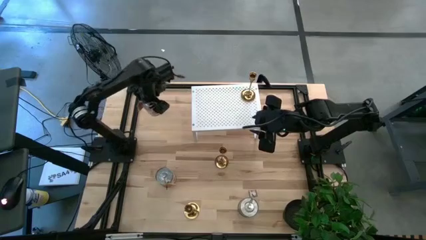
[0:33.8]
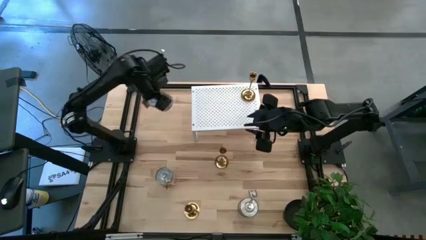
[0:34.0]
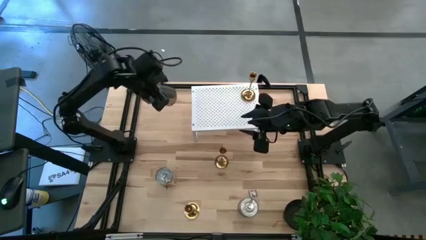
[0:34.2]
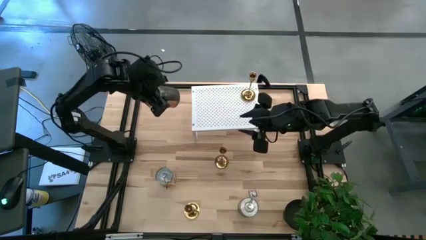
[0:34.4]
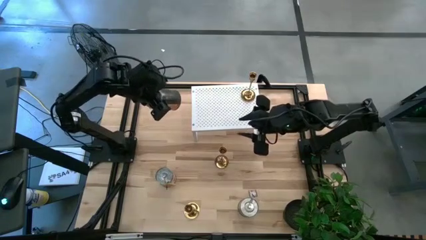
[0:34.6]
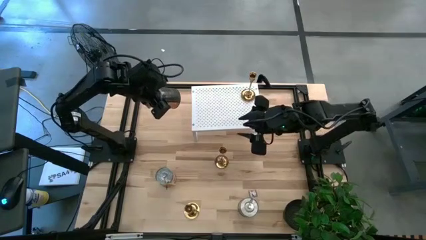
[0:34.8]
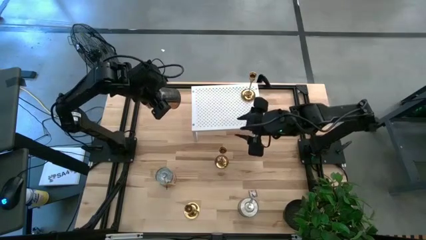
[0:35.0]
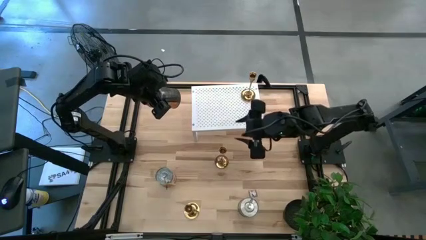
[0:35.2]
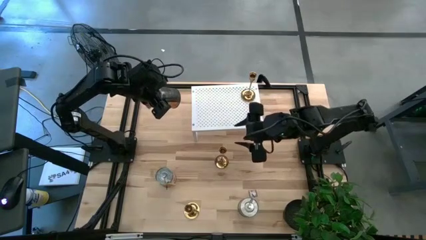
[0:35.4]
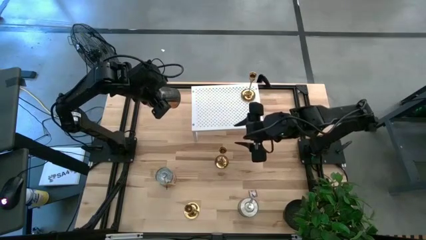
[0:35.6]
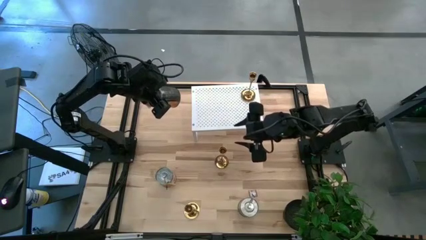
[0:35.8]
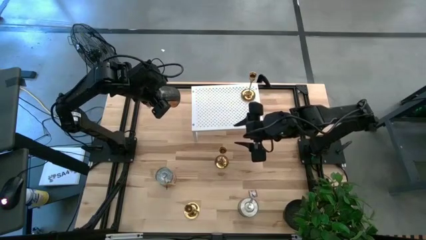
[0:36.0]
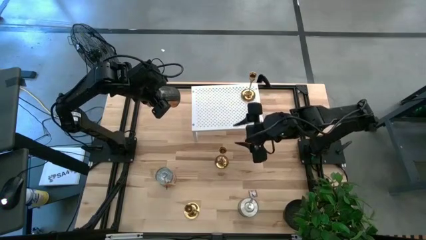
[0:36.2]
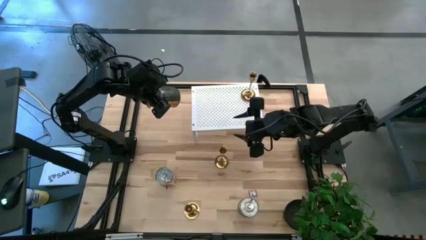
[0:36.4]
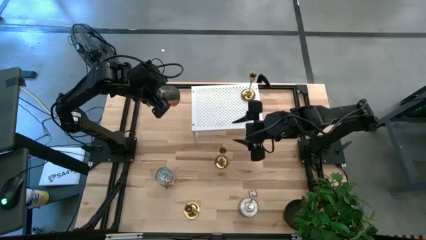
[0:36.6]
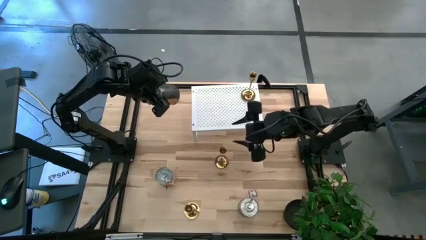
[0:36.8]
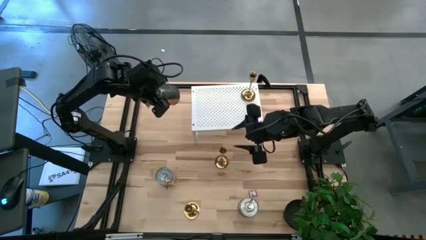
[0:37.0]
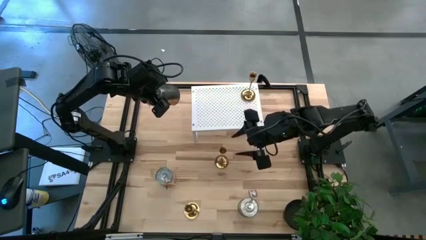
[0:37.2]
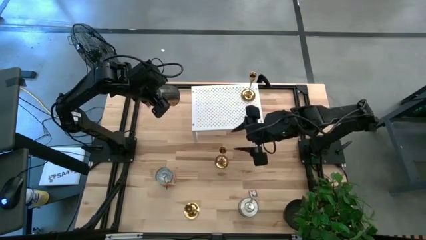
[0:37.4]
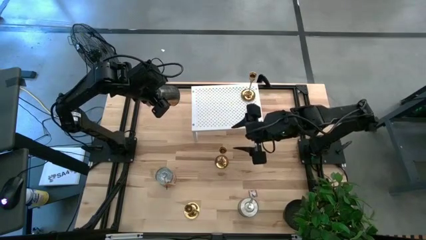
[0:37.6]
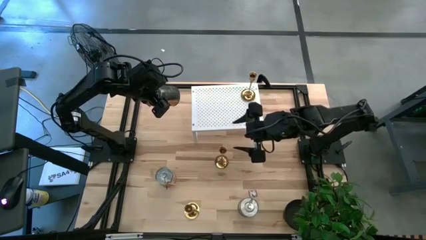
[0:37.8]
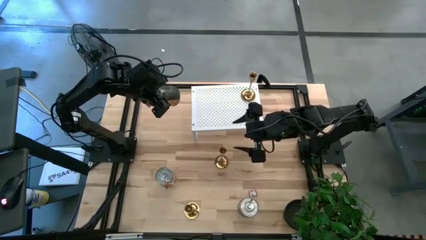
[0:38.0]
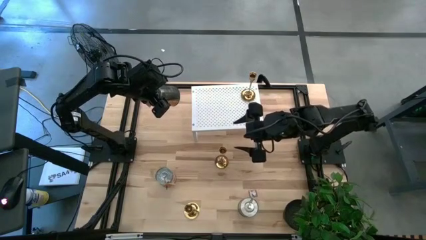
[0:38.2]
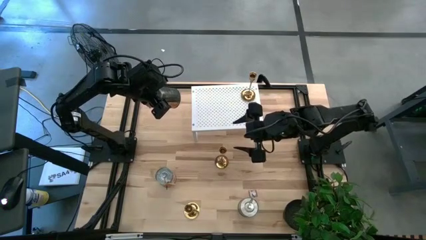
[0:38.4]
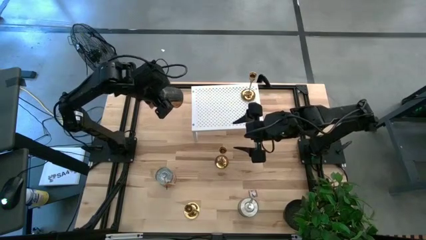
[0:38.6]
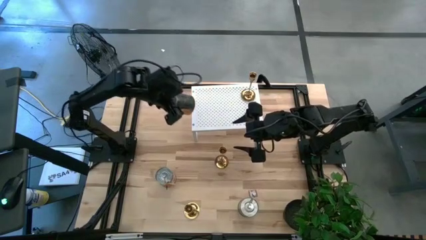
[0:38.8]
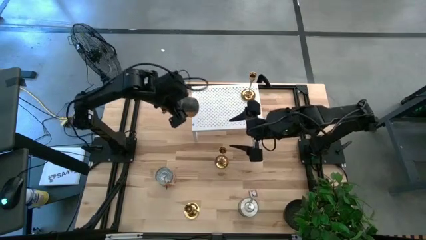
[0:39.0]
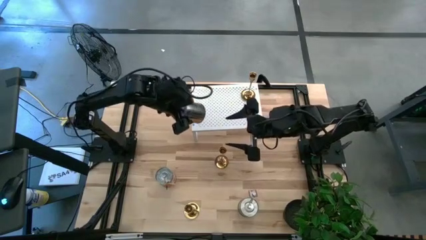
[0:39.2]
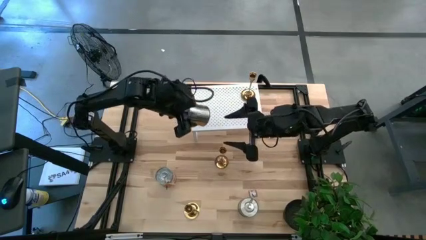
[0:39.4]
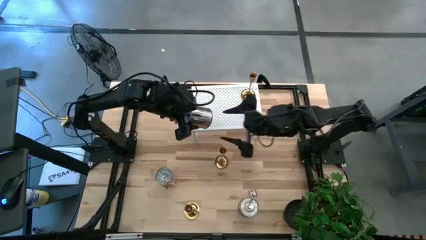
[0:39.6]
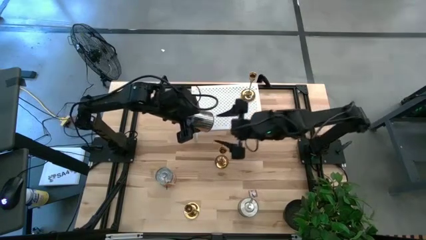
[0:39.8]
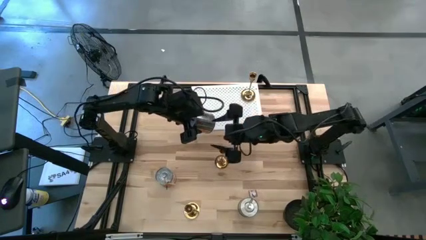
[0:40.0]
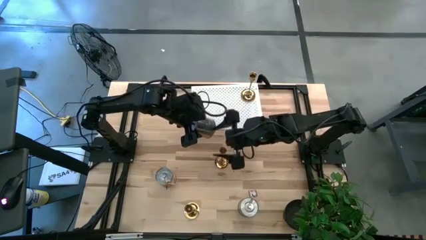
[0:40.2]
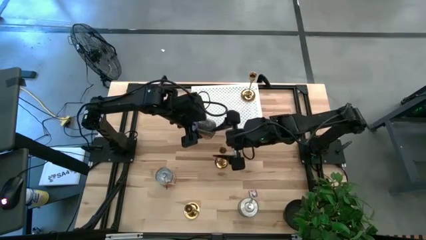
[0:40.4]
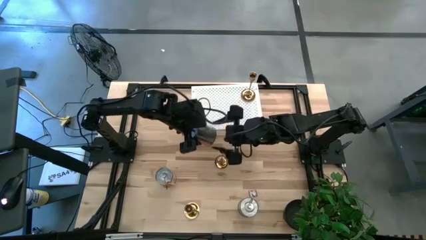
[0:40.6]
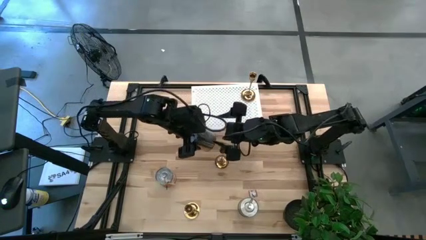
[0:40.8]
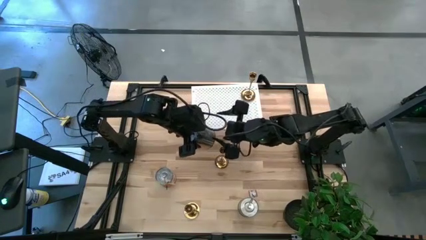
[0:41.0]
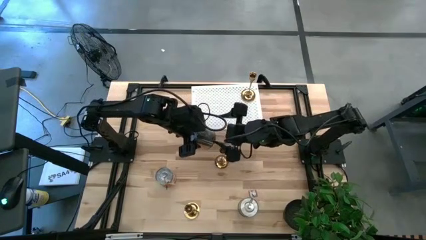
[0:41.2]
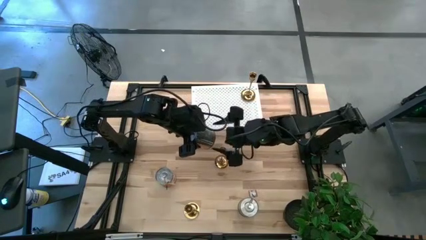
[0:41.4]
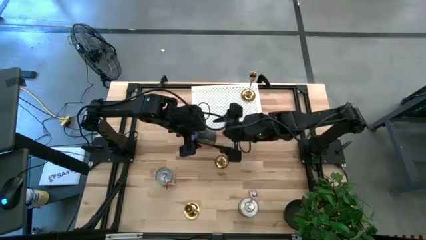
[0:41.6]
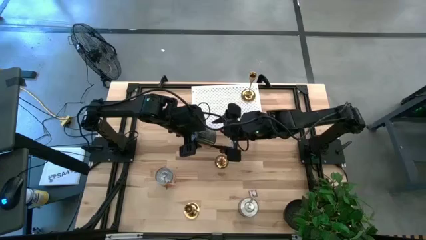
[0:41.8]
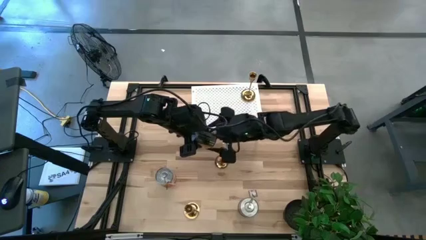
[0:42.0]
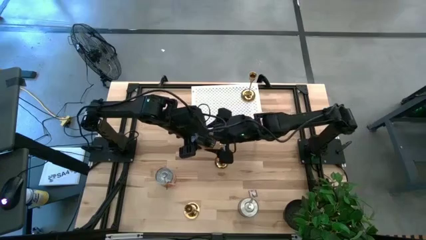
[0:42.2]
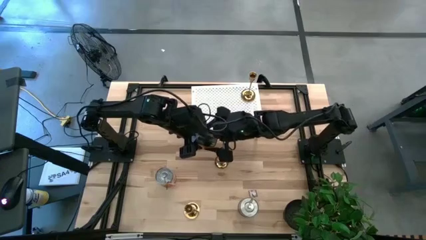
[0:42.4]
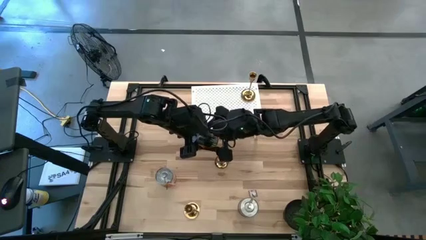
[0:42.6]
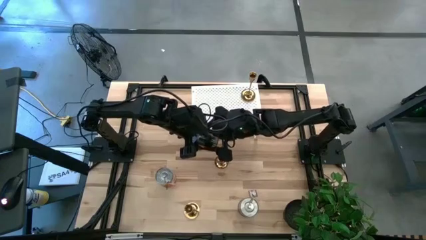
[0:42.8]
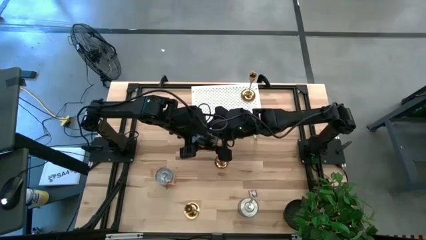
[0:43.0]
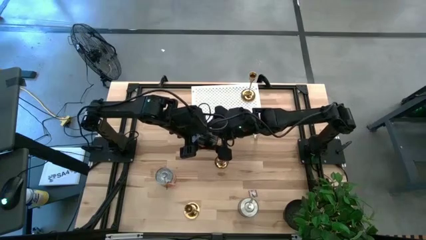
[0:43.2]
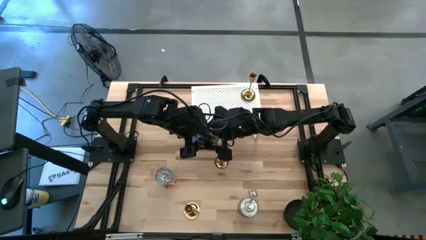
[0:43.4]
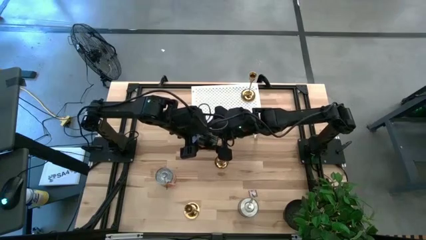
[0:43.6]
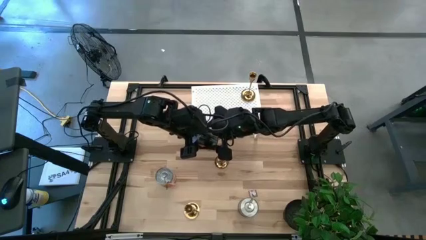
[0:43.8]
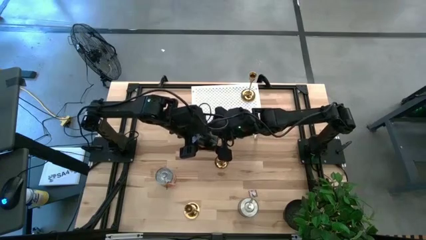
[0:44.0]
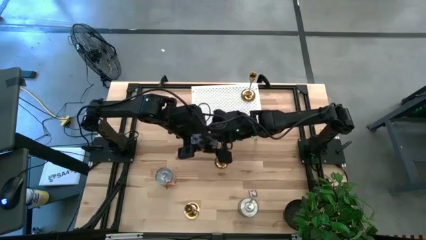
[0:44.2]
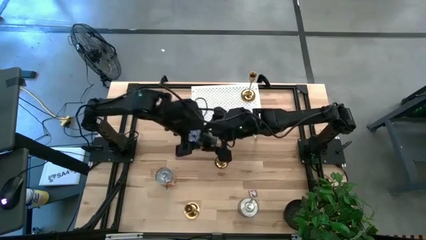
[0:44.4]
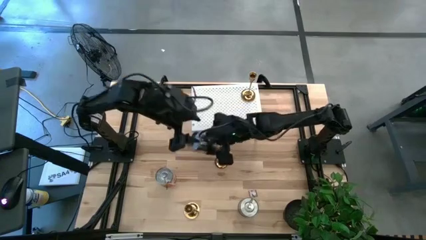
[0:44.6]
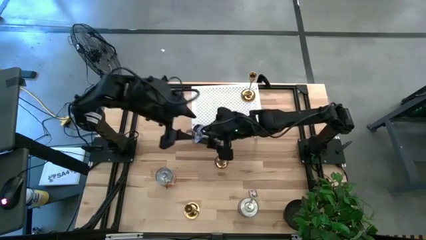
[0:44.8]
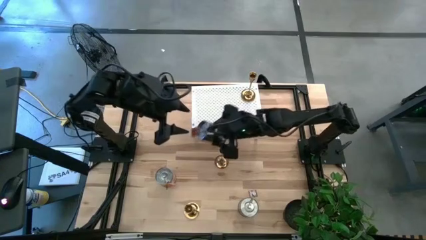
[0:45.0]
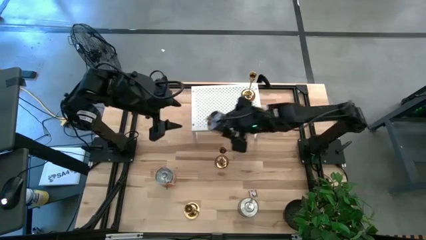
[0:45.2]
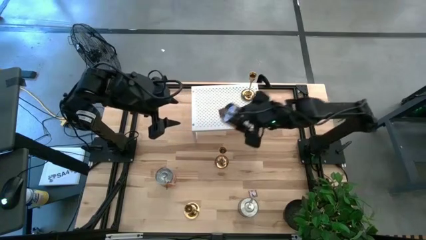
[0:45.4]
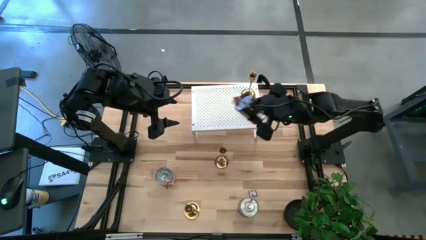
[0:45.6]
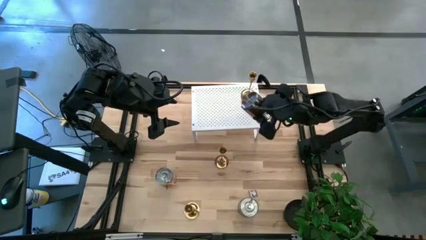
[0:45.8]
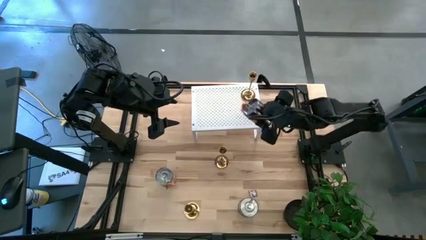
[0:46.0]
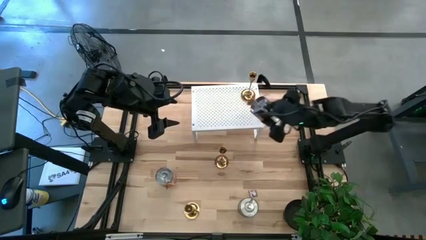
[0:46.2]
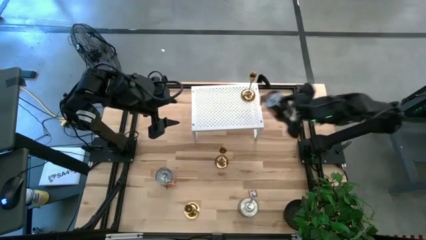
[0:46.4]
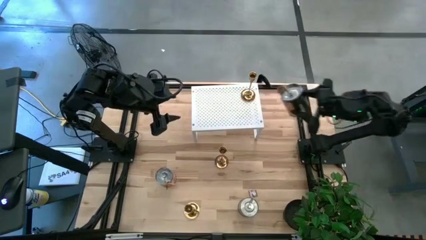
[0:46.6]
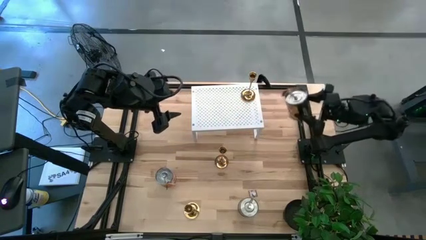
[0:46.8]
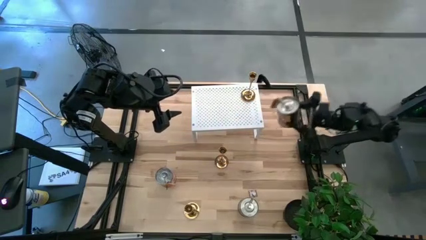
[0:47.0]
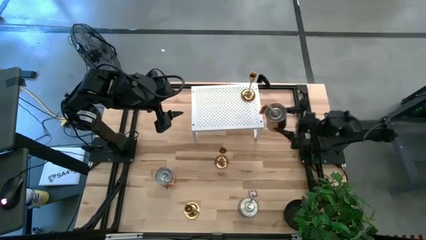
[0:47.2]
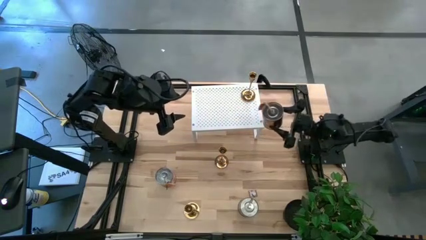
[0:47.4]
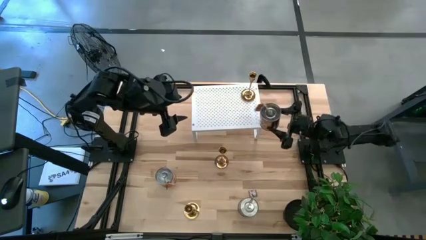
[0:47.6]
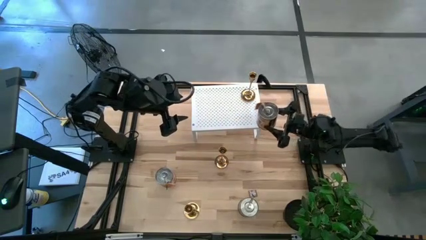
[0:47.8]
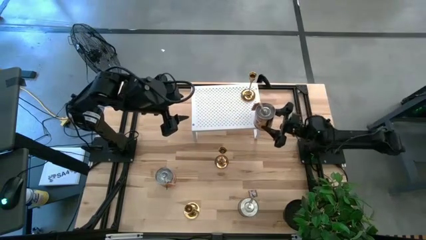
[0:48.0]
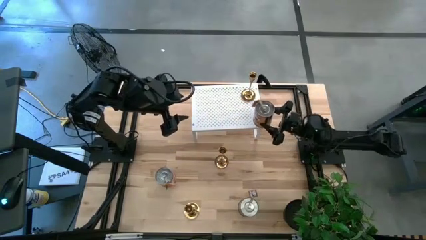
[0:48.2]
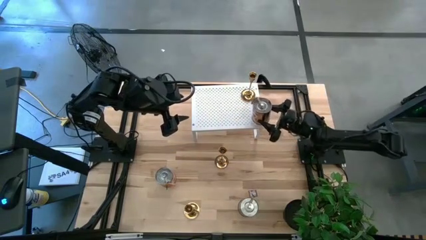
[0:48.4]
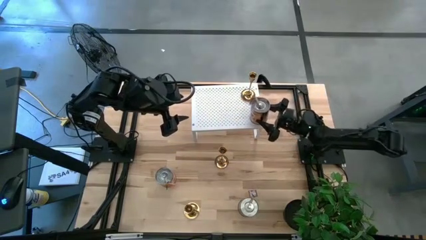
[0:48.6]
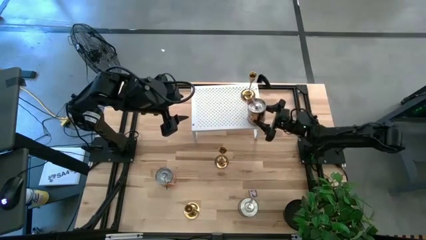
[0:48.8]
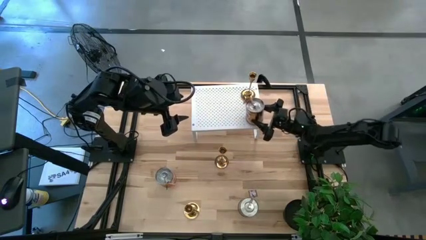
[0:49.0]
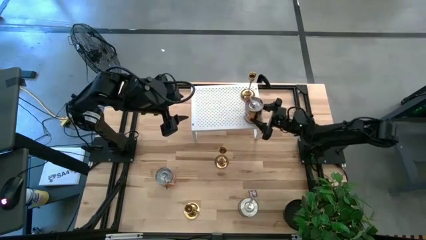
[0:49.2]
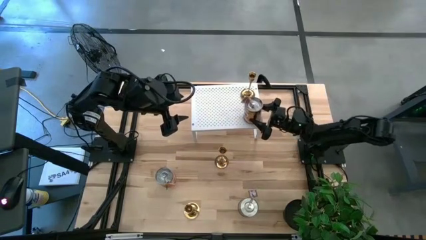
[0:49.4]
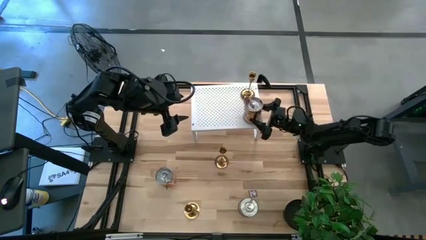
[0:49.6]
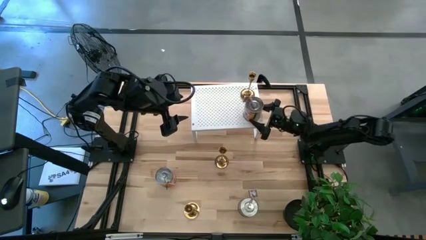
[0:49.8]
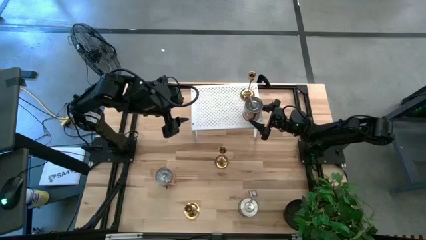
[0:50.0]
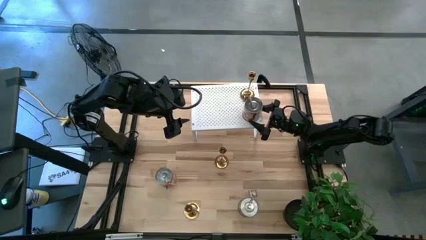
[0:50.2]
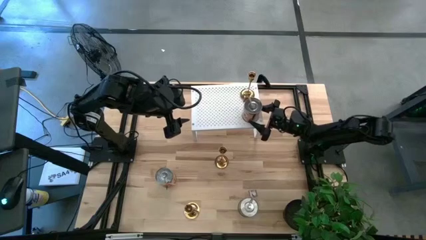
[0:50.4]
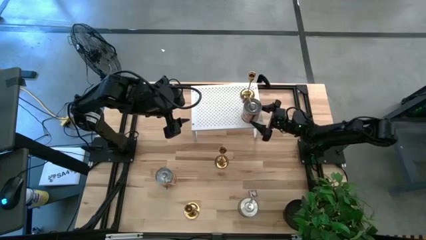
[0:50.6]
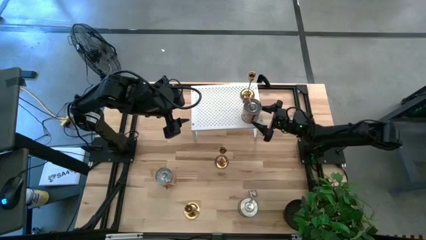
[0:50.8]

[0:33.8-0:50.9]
Task: Pick & Place candle stick holders
Put the top silver candle on the shelf aligned with the gold candle holder
